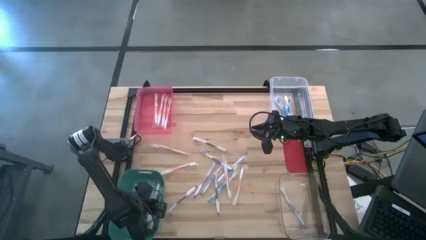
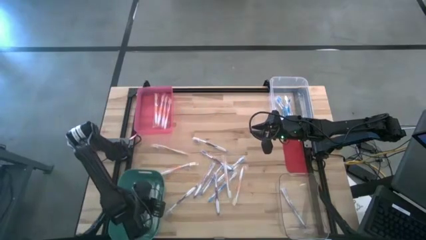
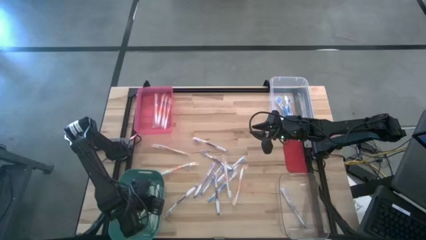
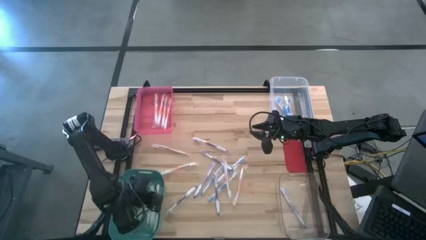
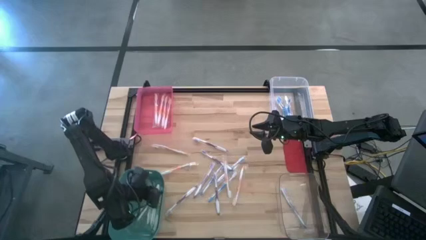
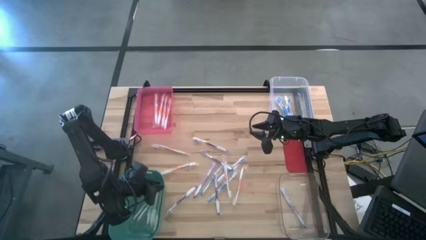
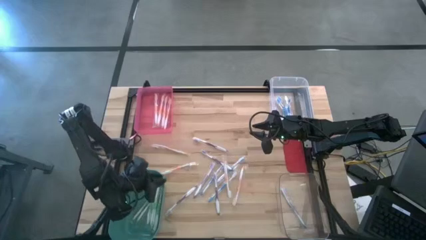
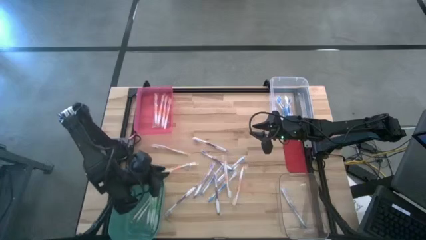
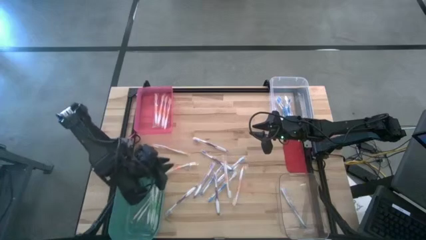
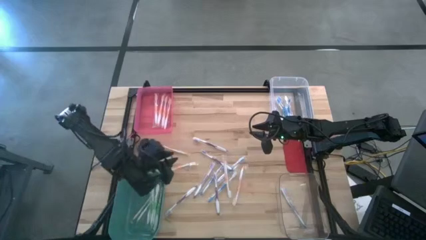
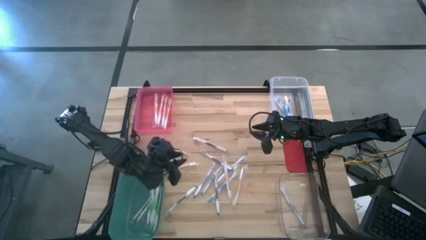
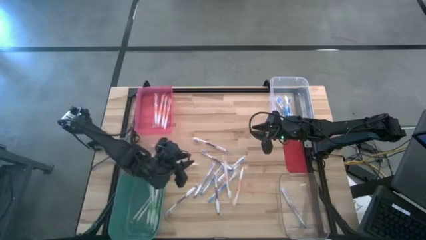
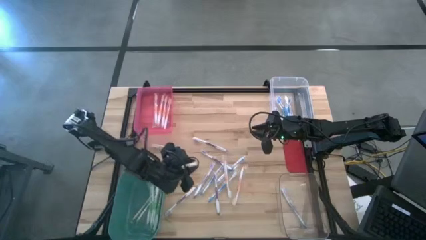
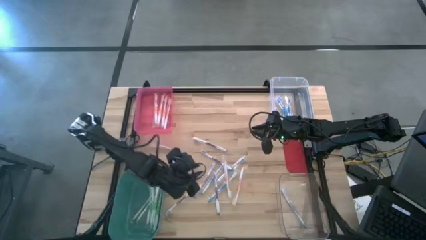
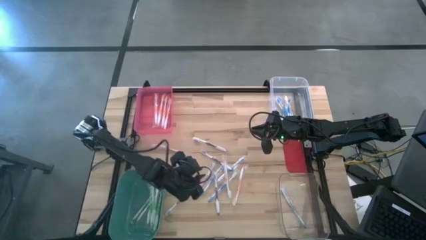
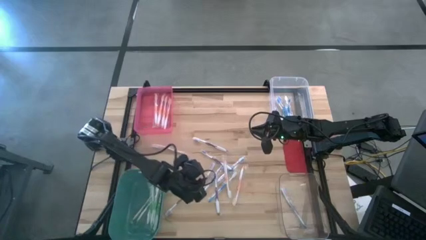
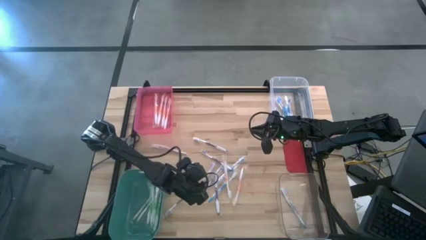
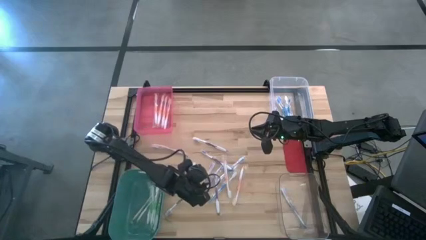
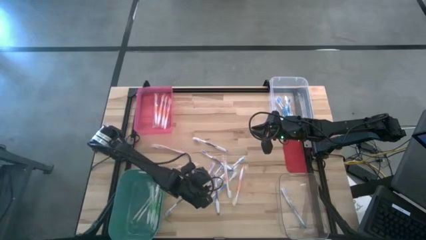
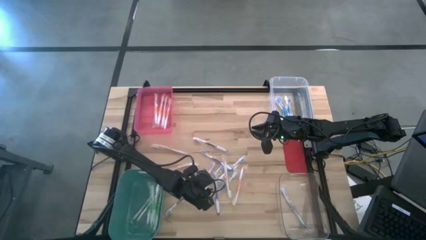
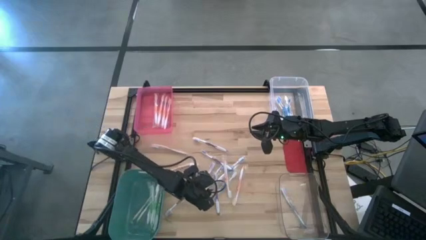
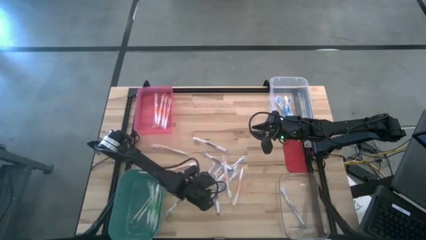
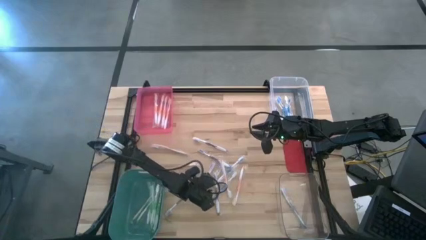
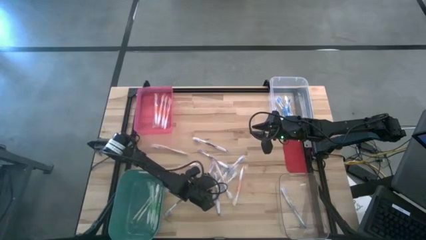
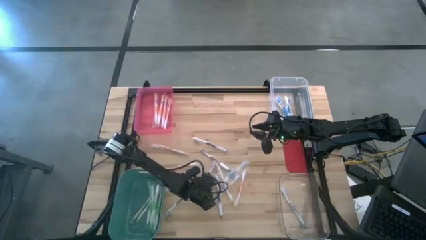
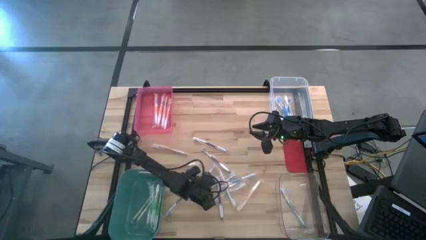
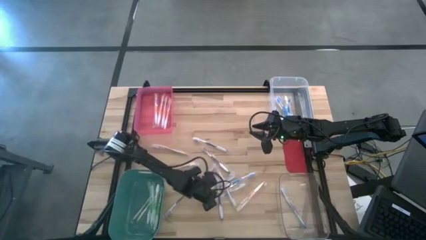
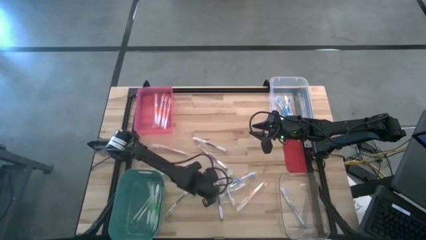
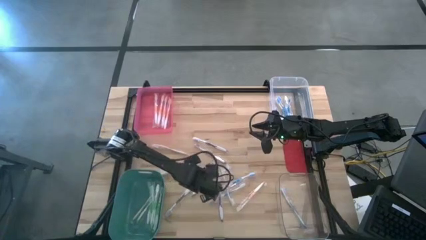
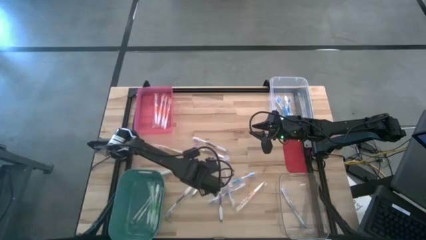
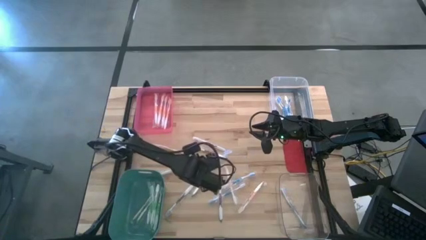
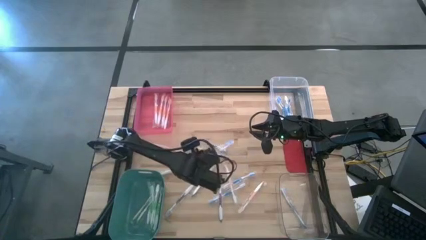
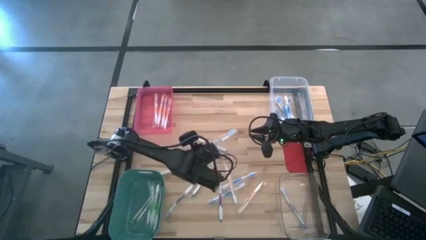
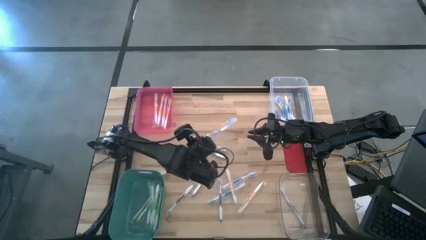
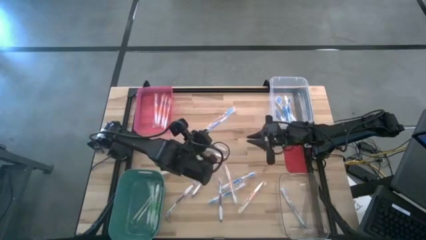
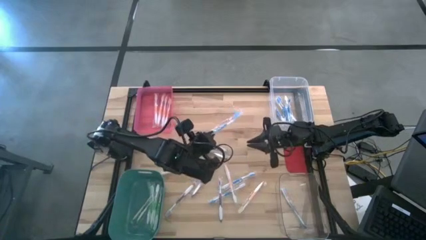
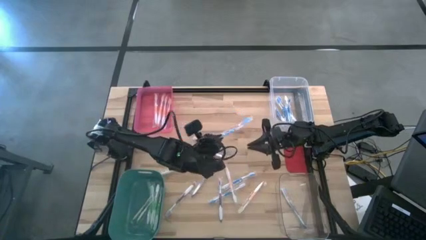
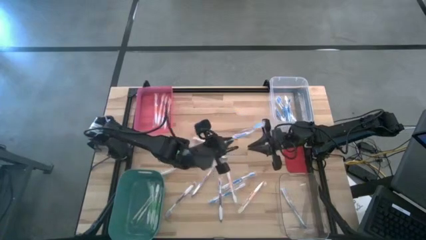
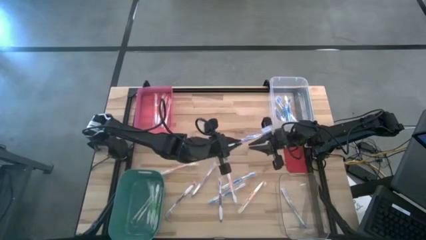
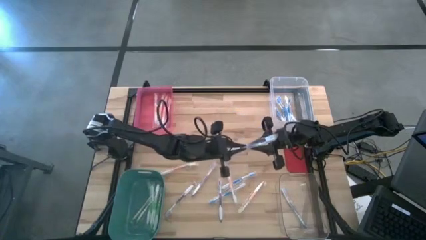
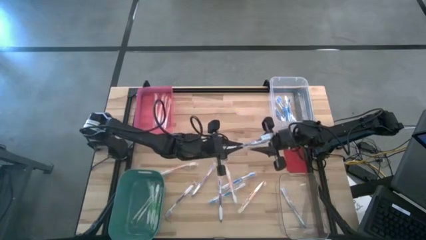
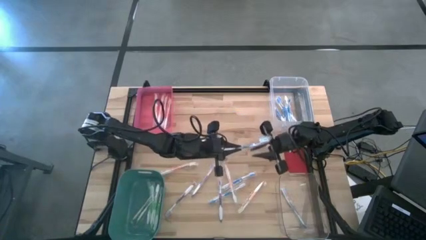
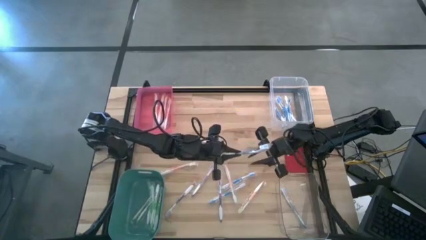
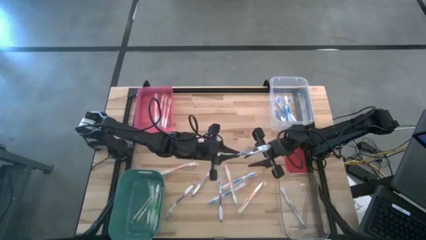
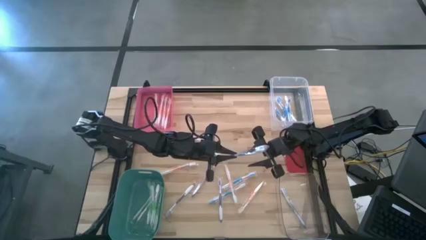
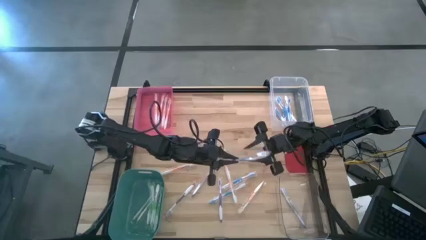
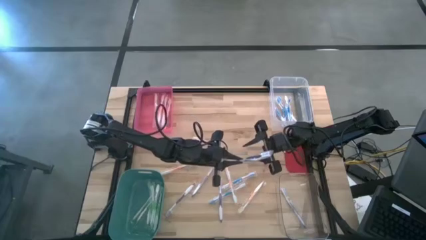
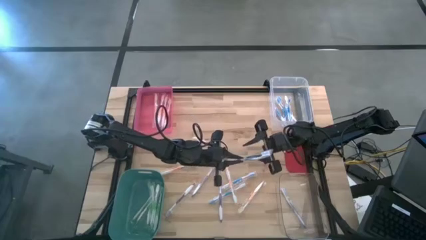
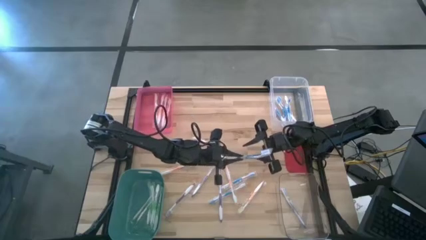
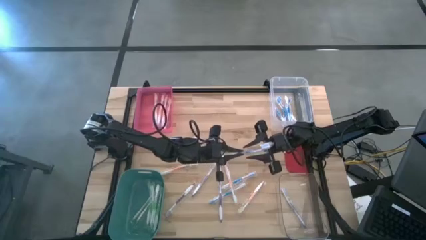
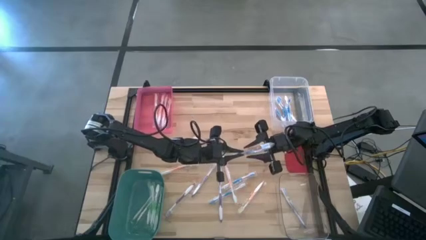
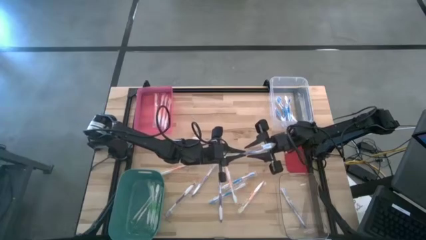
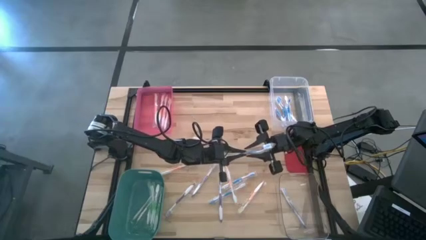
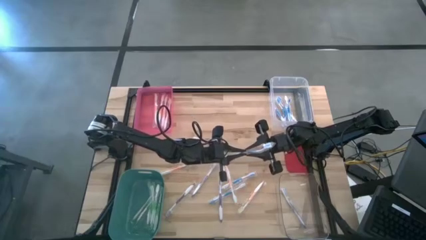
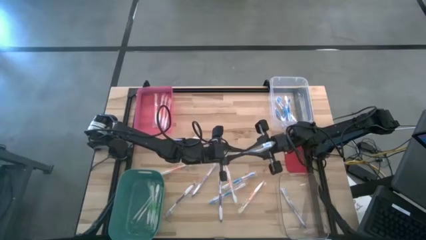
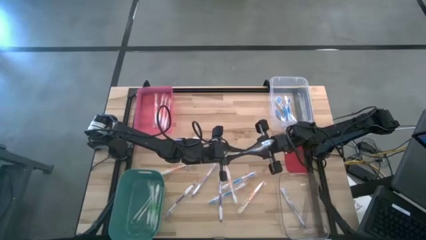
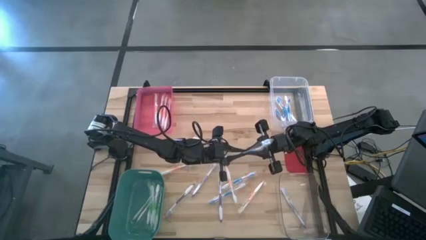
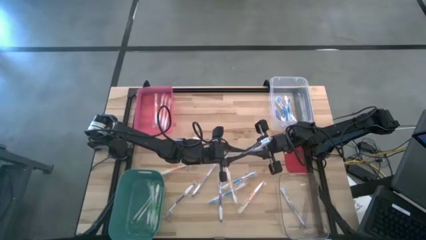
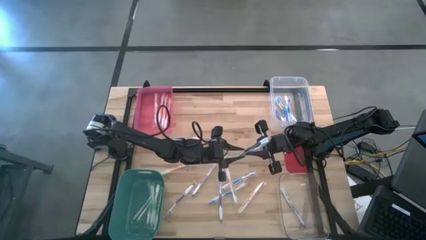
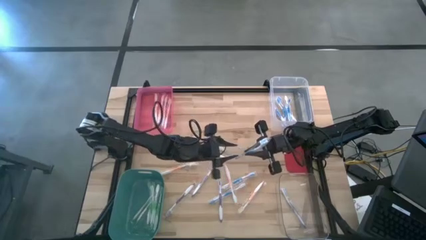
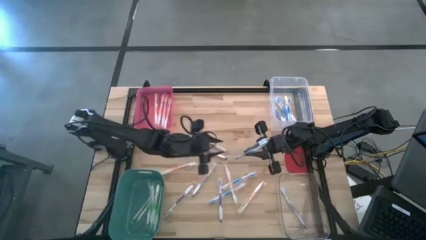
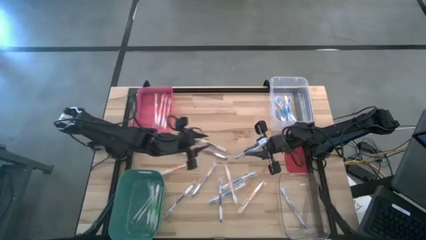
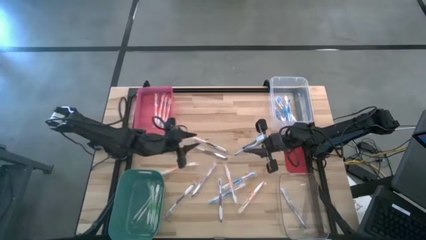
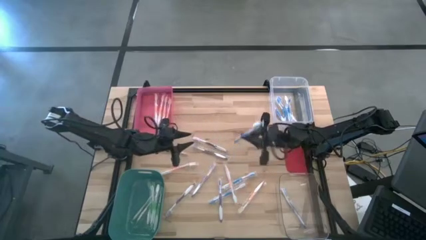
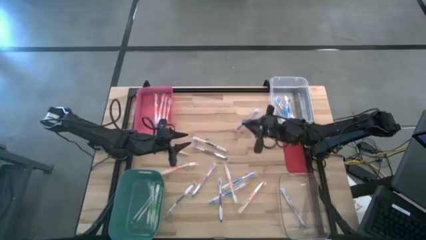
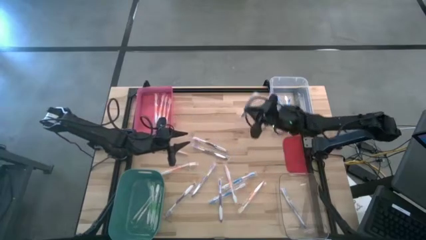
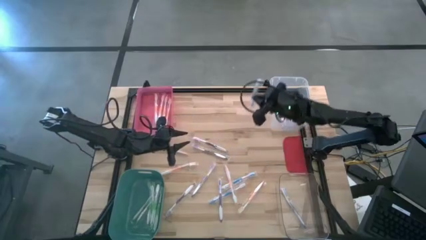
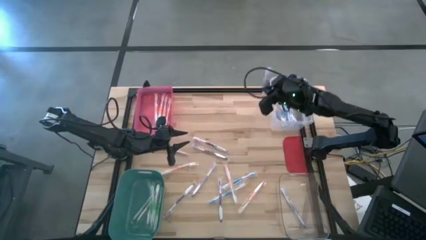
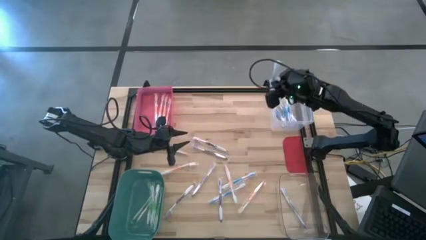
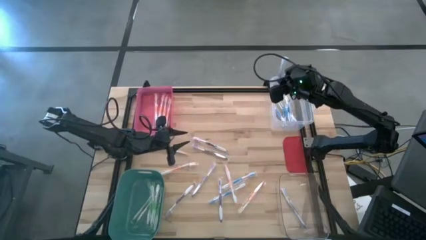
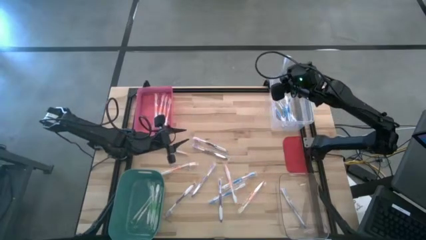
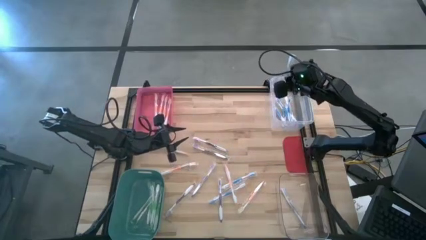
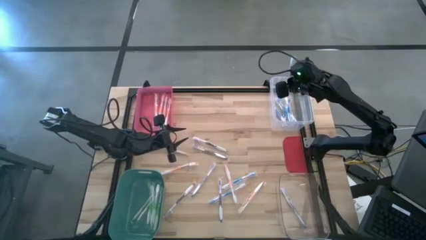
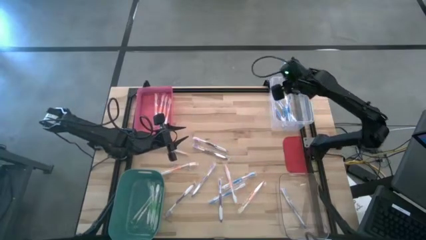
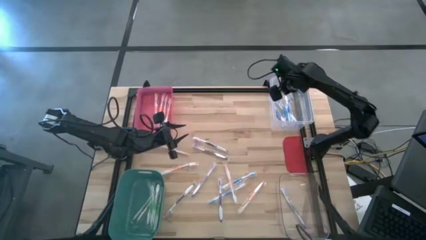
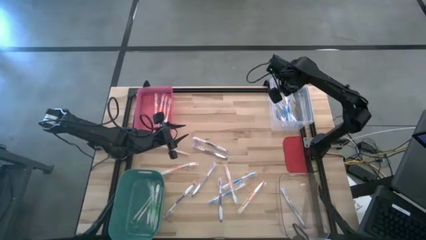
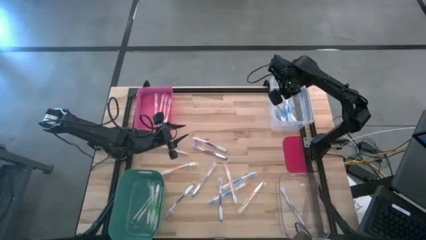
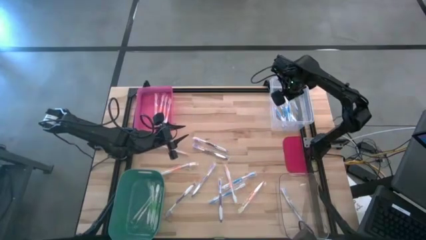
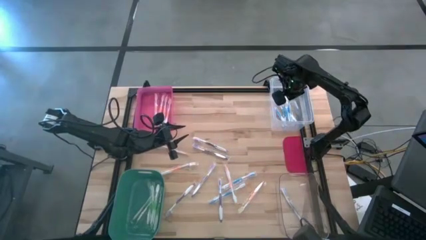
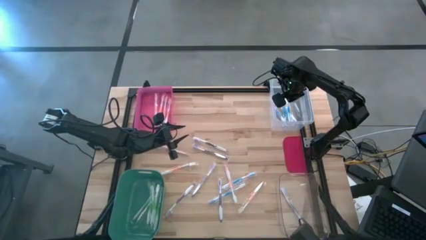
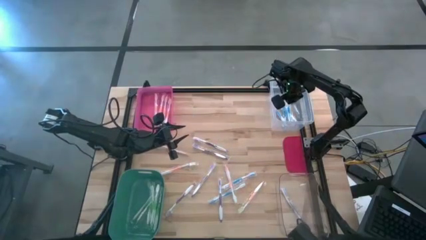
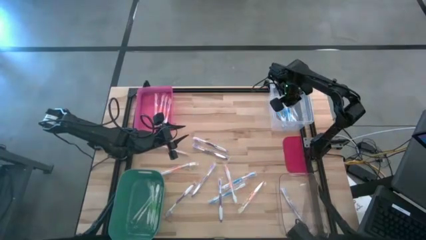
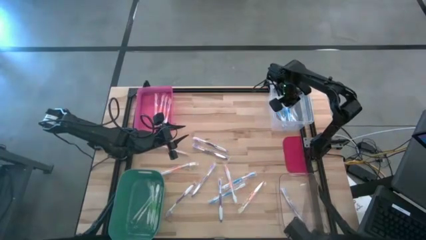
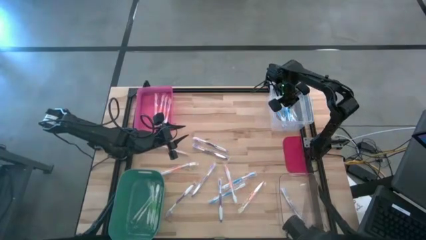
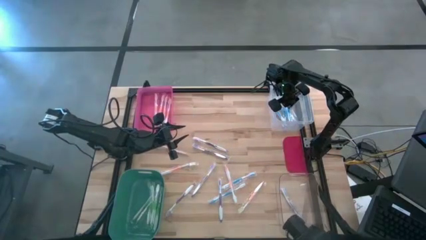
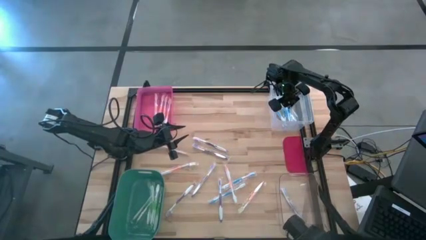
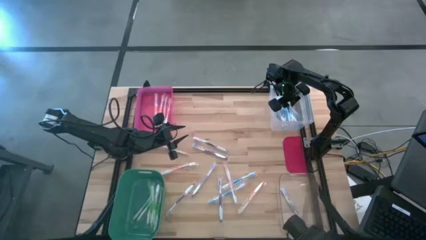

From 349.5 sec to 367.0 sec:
Task: Pick & Place Toothbrushes
Put the blue toothbrush into the top transparent bin
